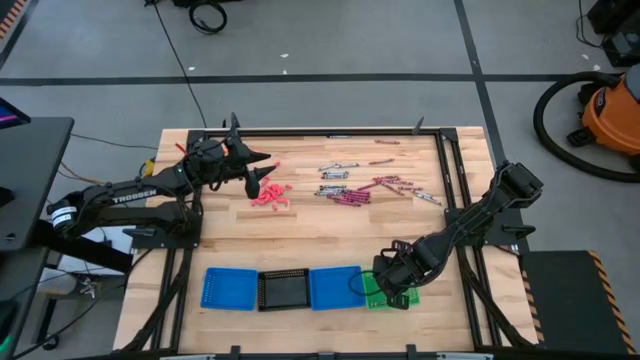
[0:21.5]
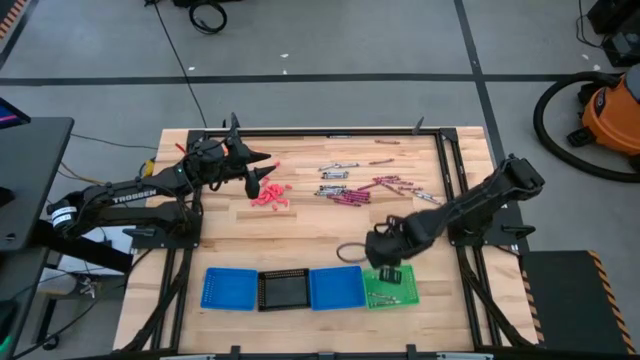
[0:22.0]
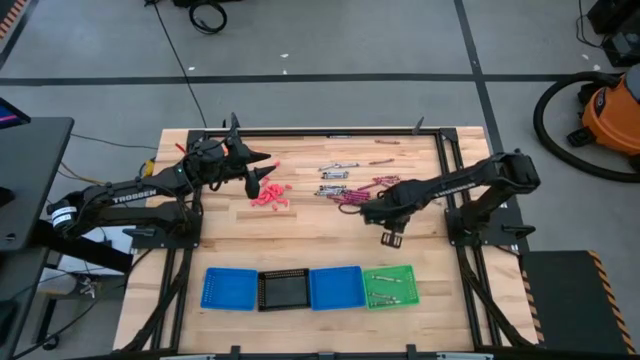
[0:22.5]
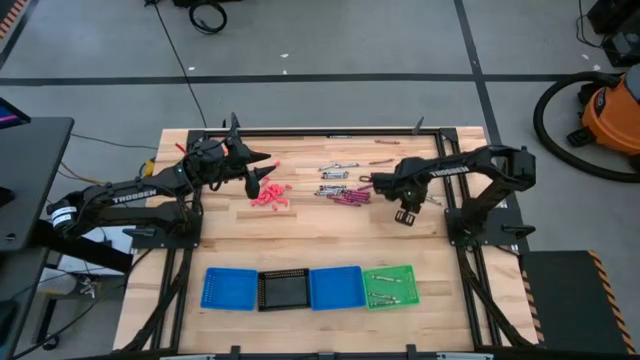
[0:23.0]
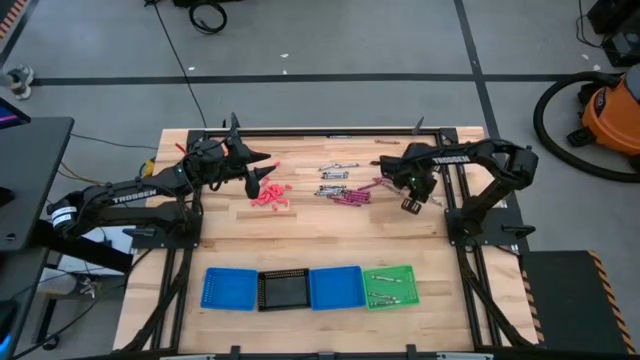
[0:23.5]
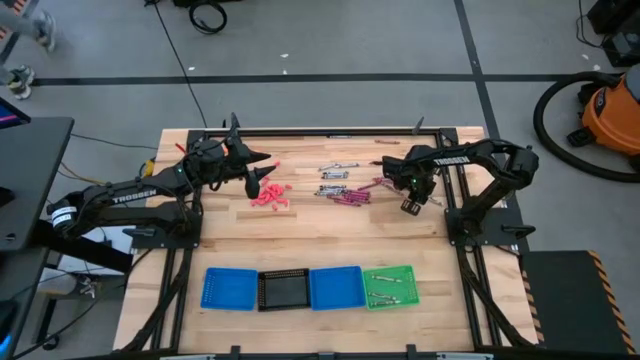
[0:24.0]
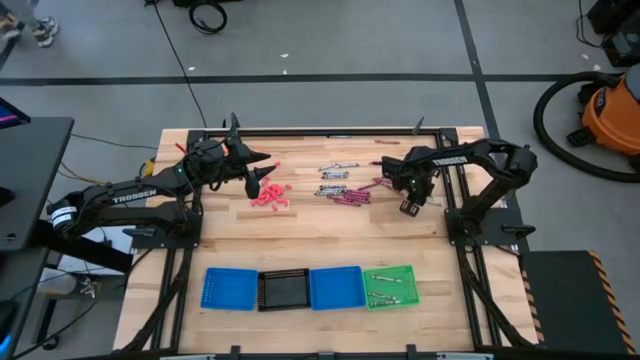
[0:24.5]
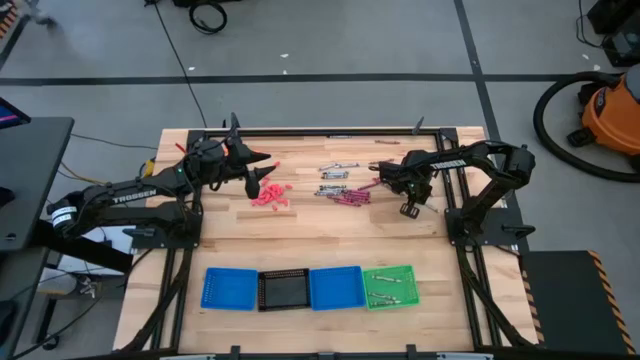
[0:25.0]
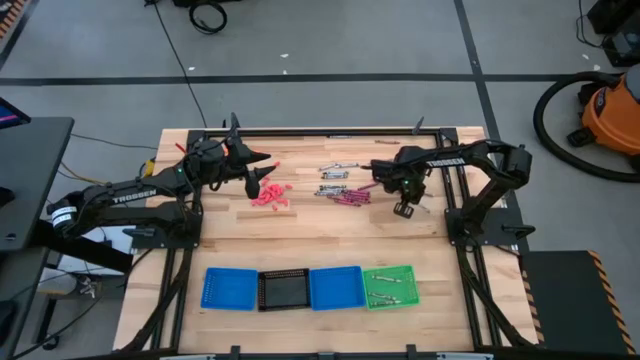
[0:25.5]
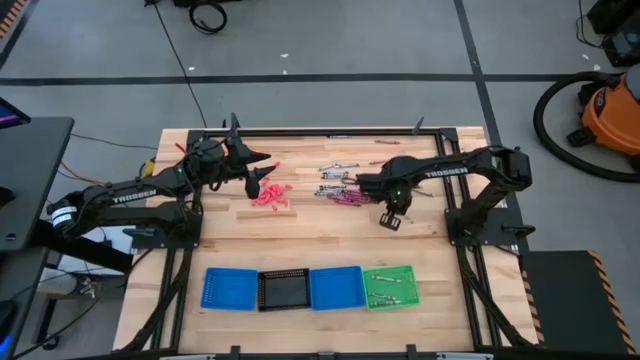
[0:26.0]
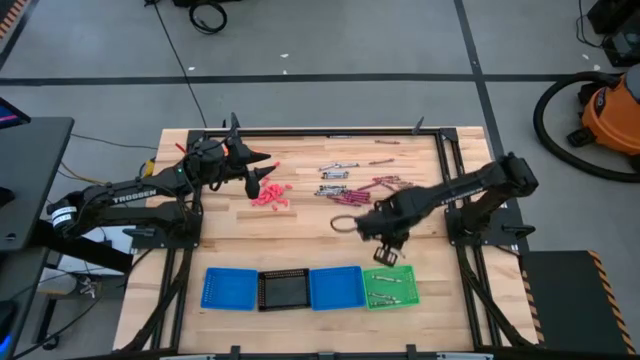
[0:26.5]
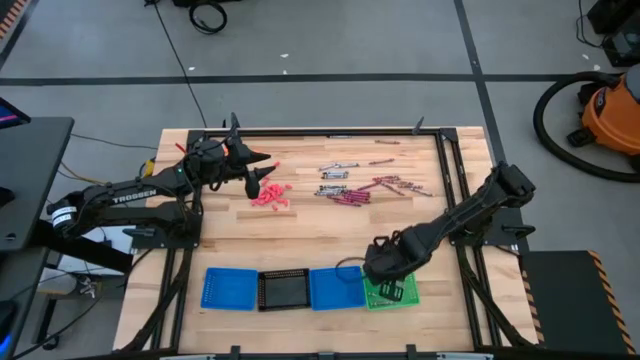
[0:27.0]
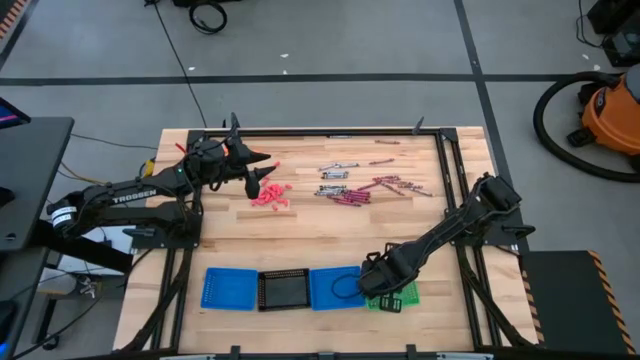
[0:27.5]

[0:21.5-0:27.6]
Task: Sort crayons
Put the white crayon into the green bin

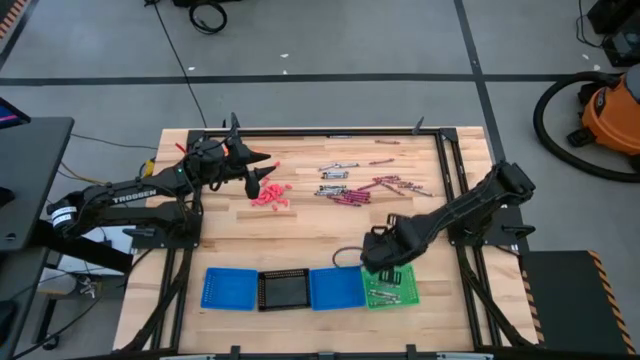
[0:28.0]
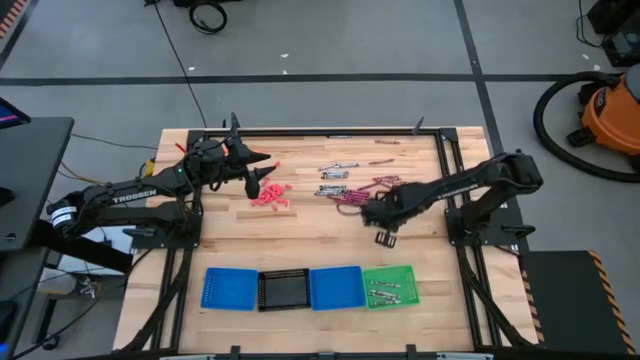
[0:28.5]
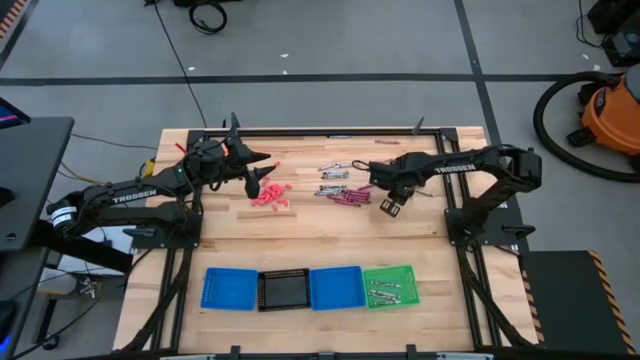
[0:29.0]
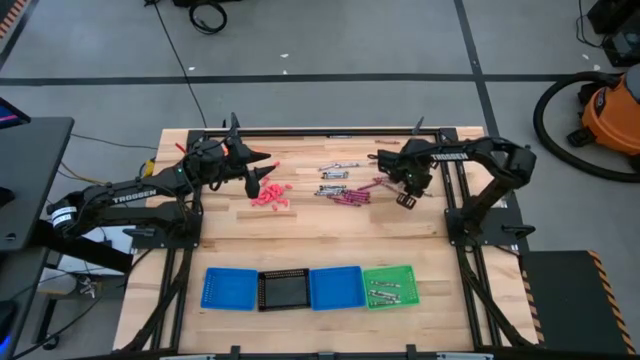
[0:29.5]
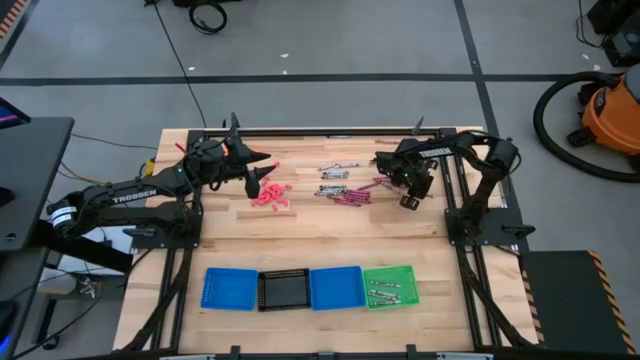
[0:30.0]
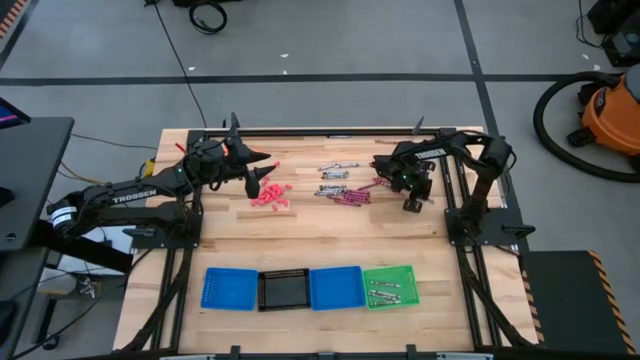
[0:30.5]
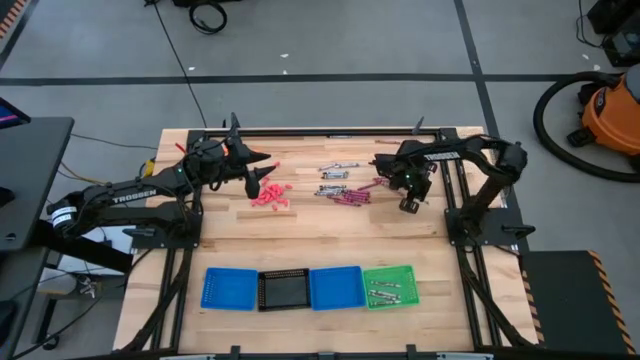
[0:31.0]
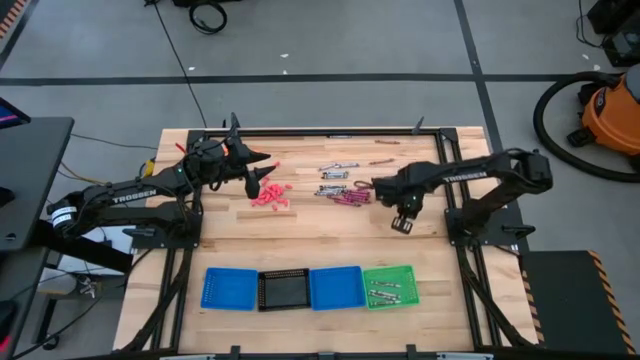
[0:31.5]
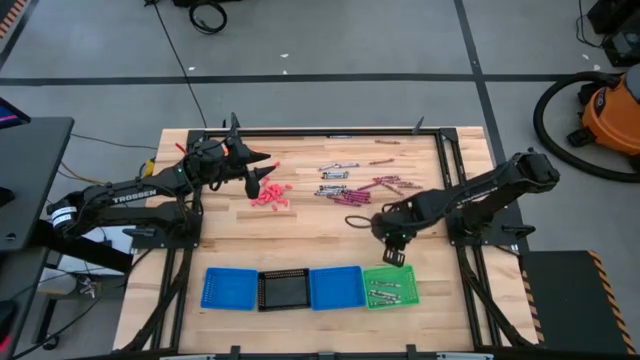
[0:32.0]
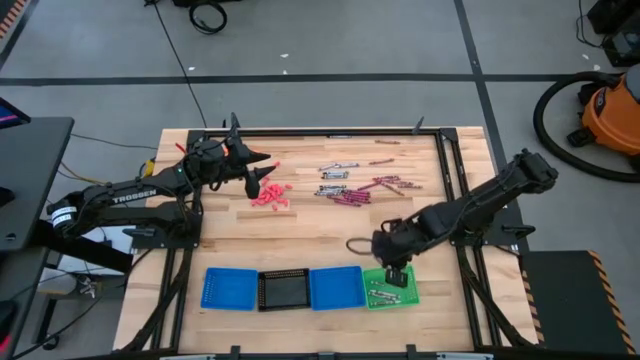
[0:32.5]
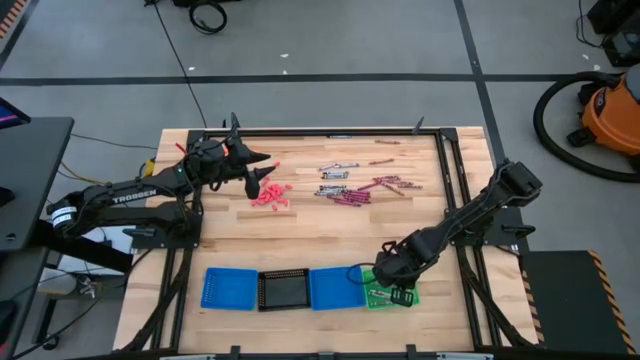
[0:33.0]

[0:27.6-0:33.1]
Put the white crayon into the green bin

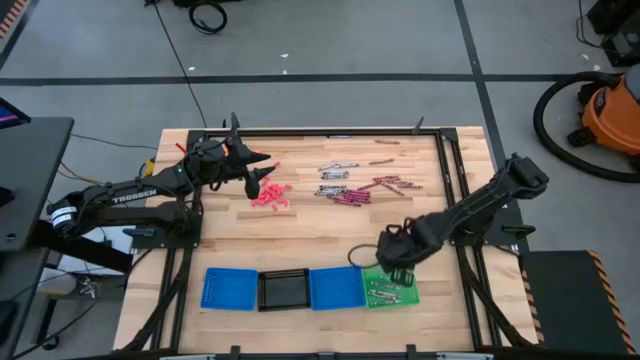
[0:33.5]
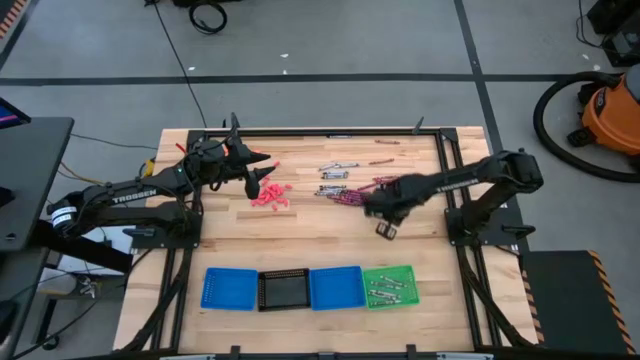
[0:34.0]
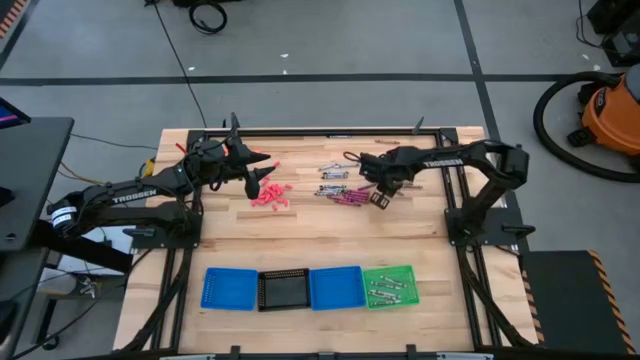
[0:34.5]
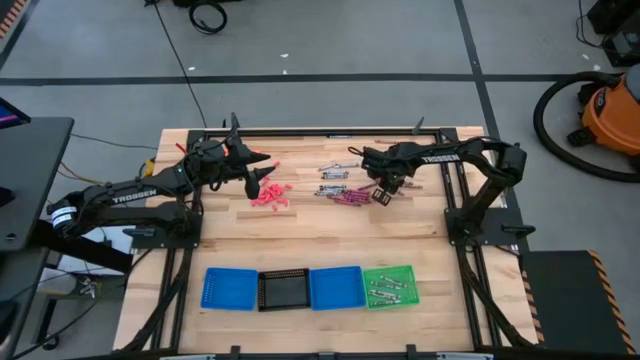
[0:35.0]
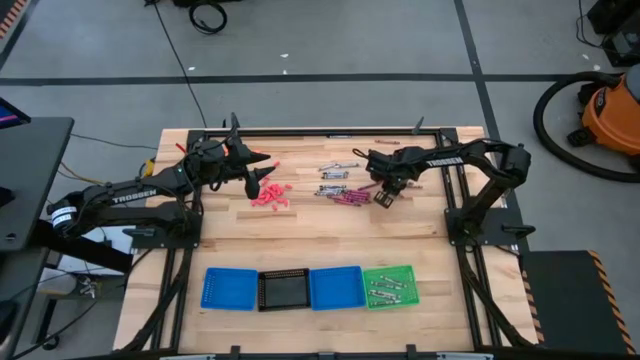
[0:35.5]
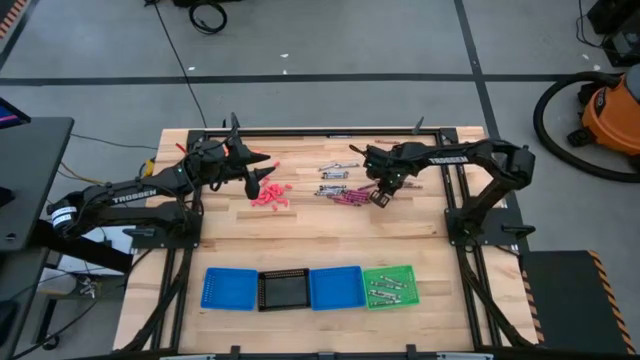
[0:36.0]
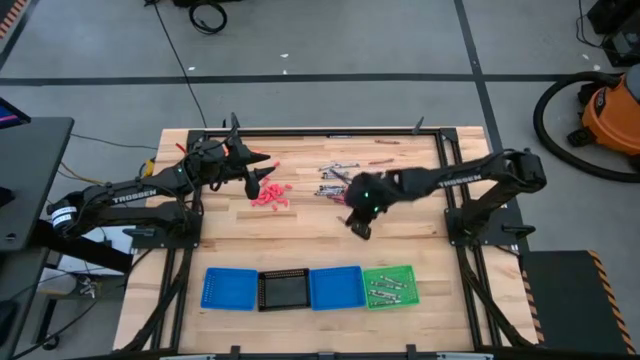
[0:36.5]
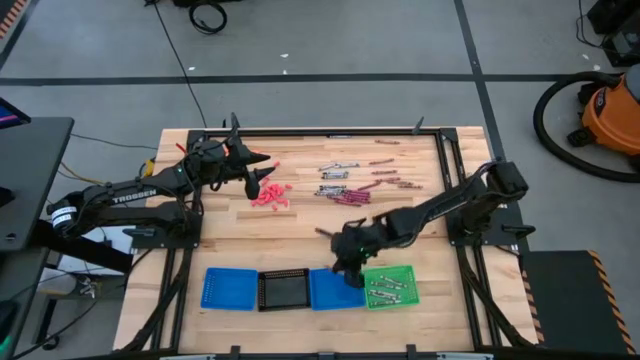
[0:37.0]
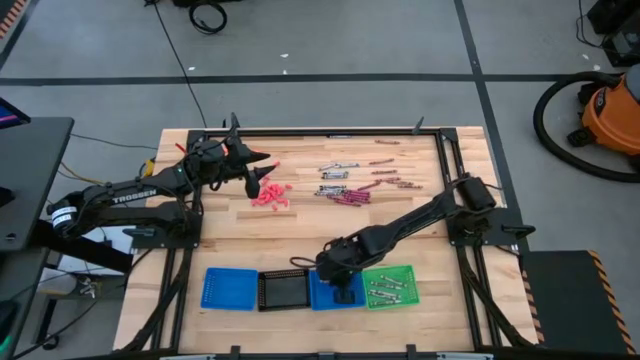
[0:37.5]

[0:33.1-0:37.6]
Put the pink crayon into the right blue bin

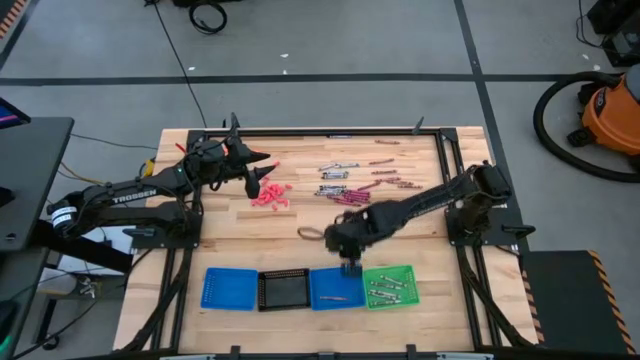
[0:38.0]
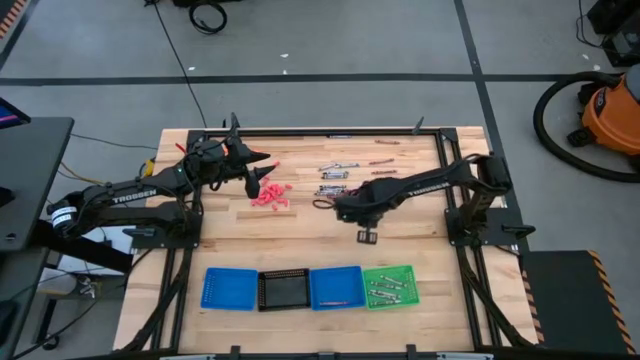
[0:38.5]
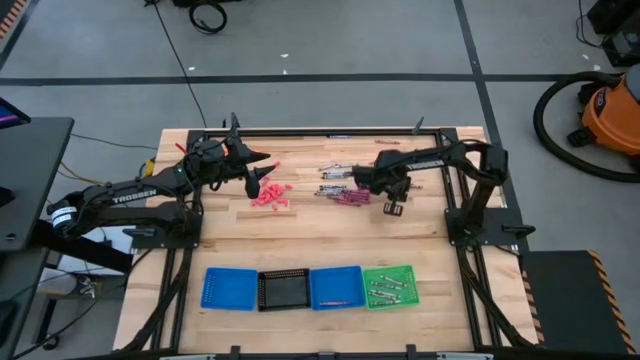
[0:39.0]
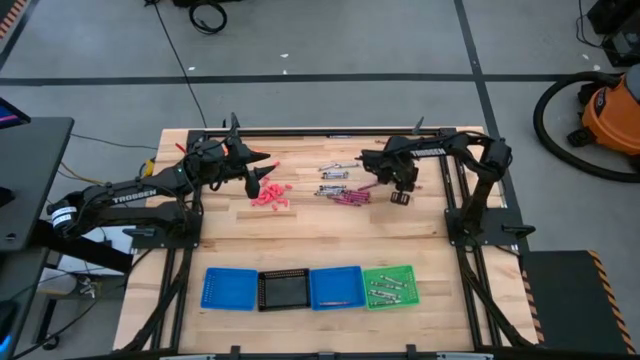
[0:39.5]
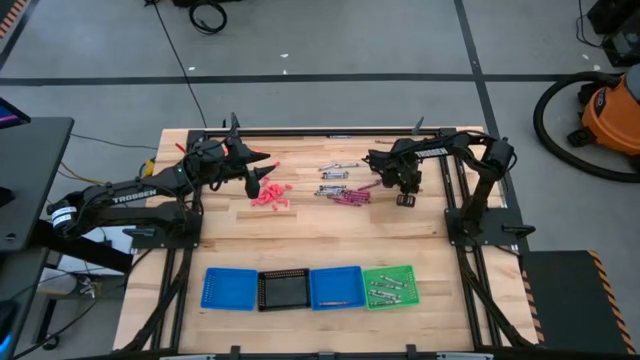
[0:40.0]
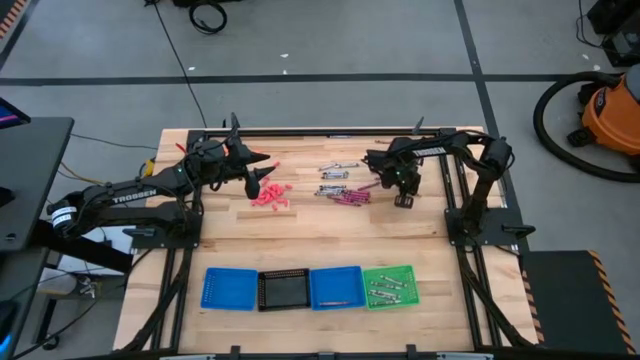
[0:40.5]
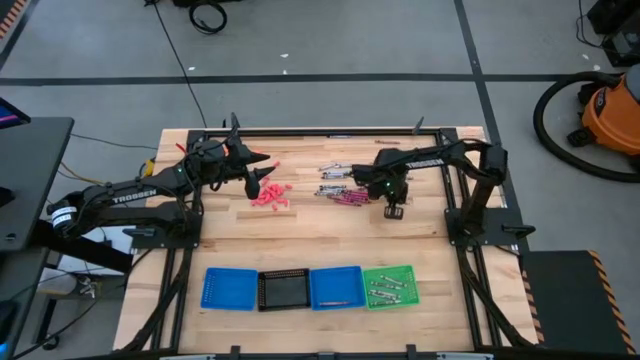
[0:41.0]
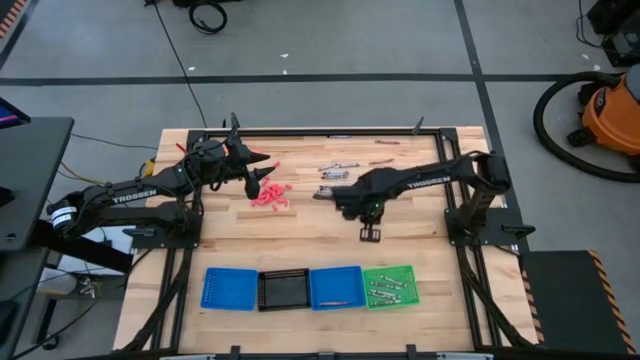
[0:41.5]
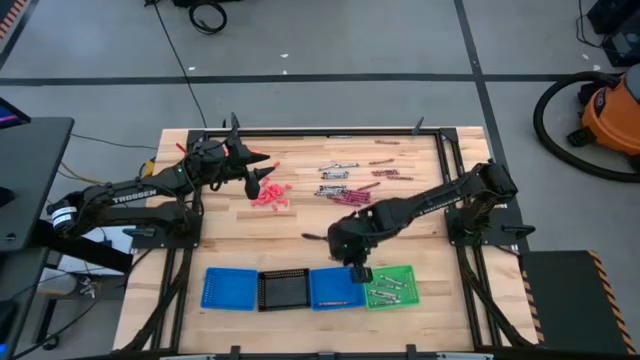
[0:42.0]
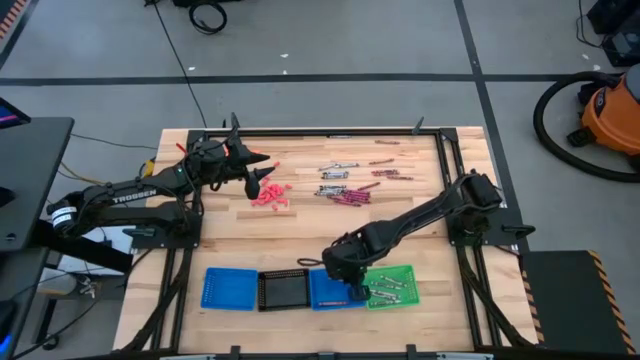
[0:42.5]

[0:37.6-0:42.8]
Put the pink crayon into the right blue bin
